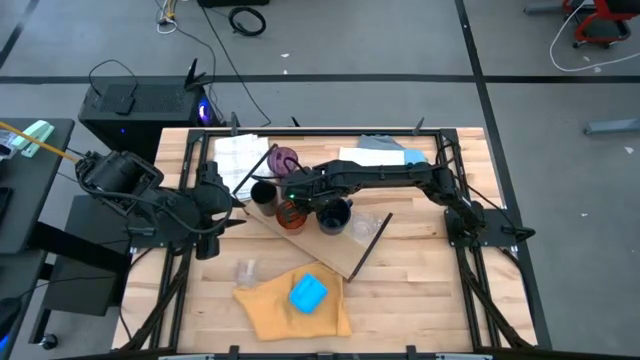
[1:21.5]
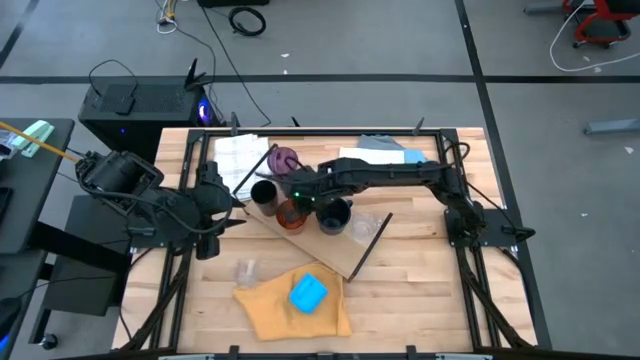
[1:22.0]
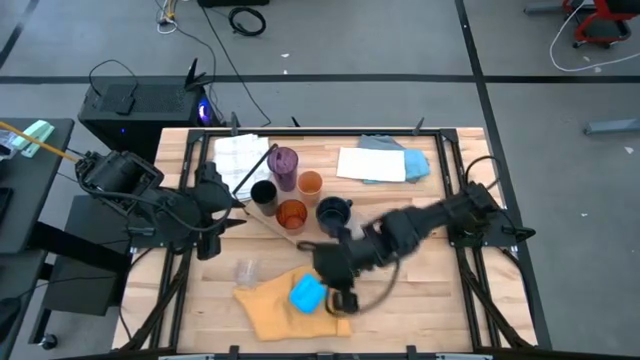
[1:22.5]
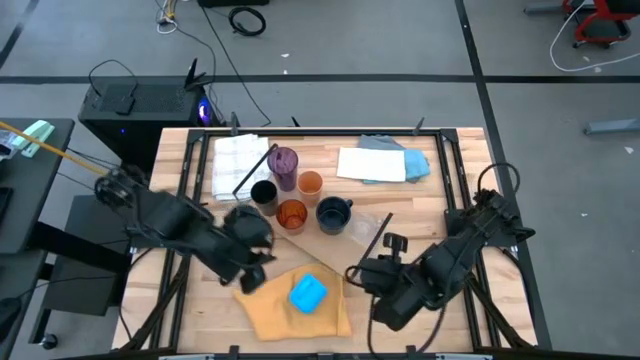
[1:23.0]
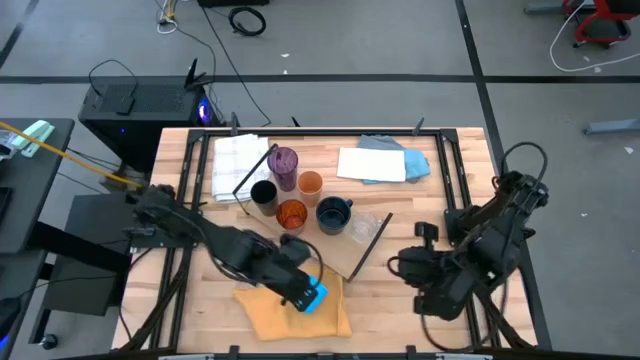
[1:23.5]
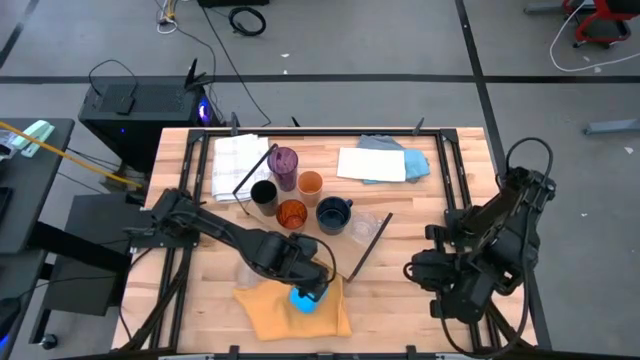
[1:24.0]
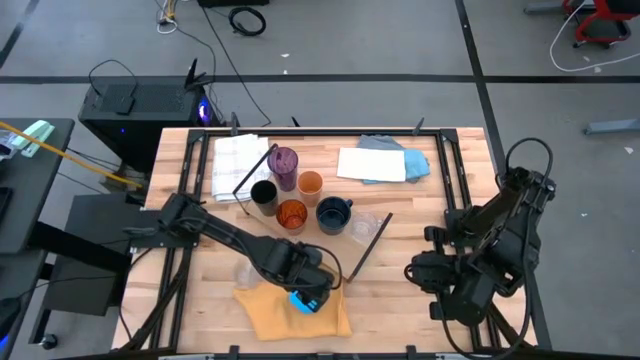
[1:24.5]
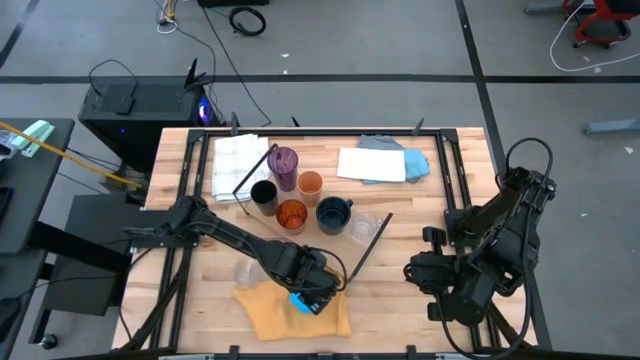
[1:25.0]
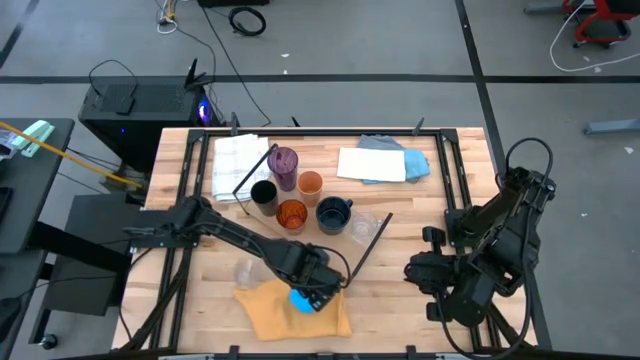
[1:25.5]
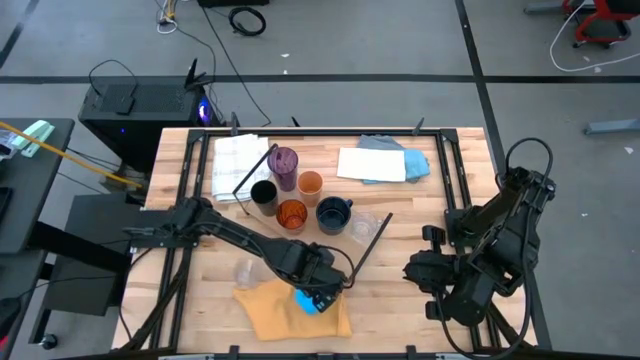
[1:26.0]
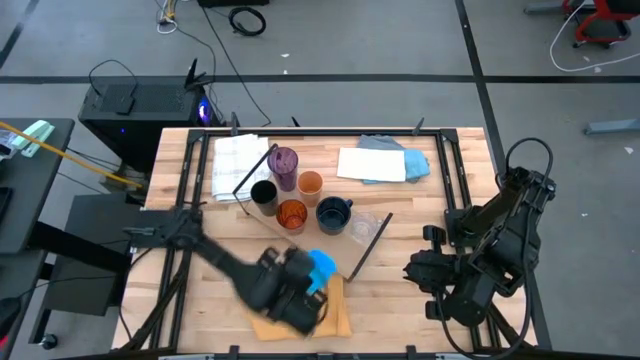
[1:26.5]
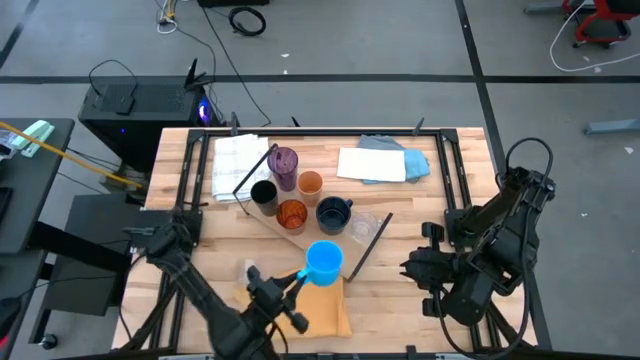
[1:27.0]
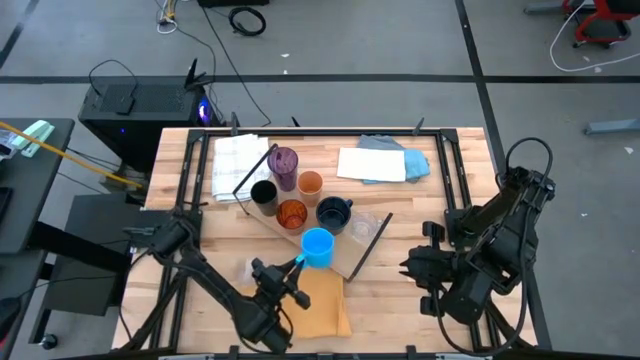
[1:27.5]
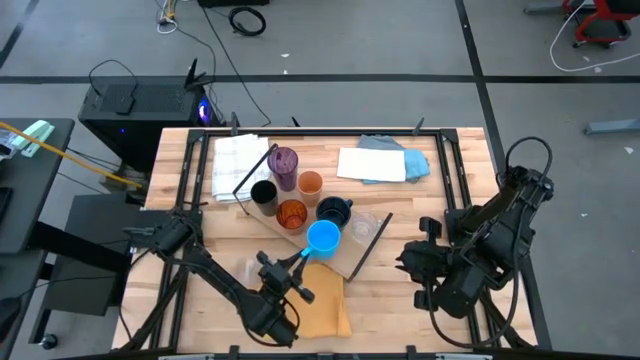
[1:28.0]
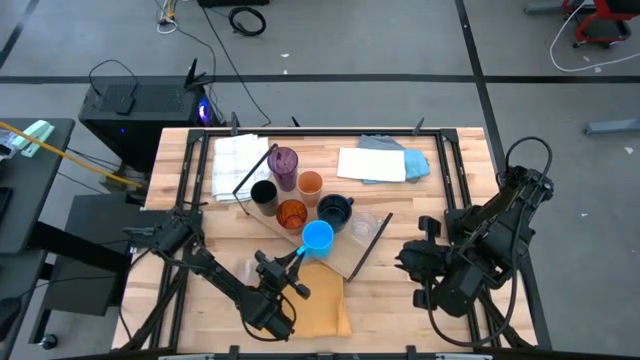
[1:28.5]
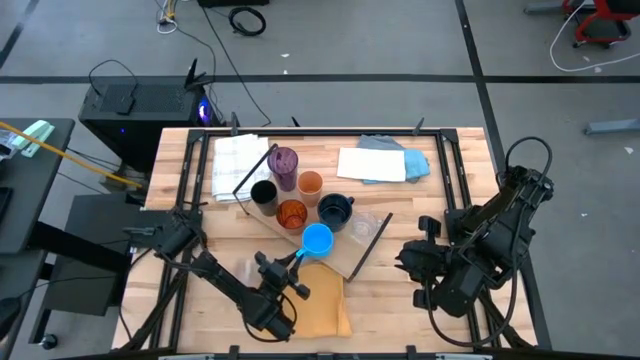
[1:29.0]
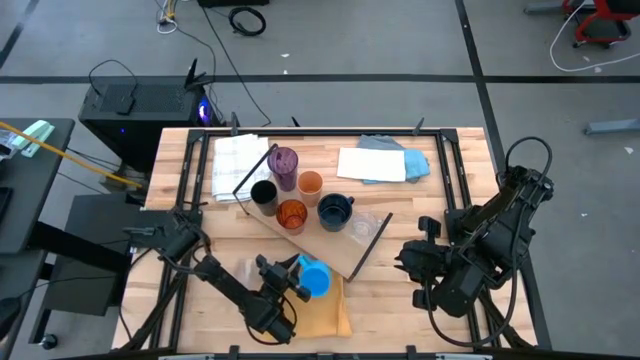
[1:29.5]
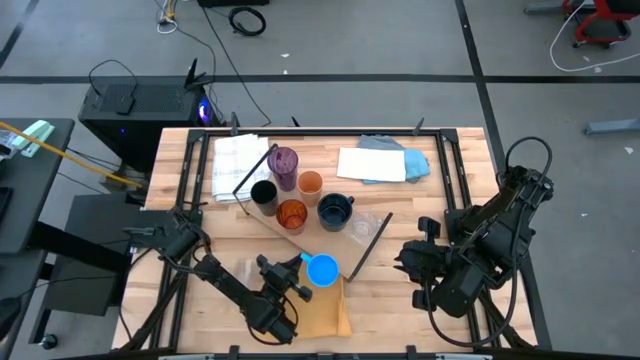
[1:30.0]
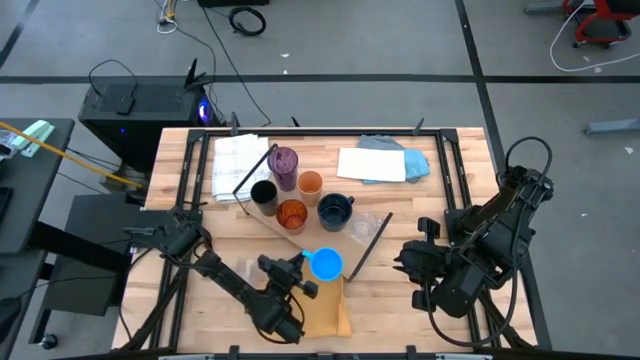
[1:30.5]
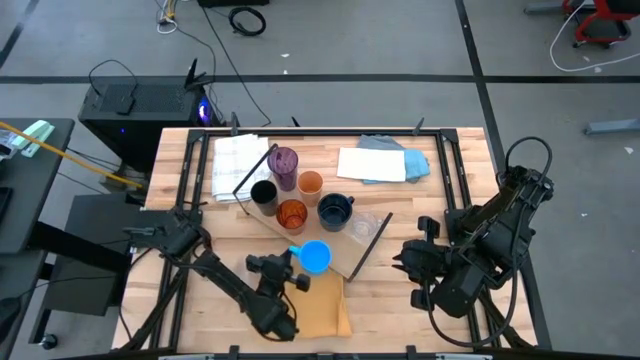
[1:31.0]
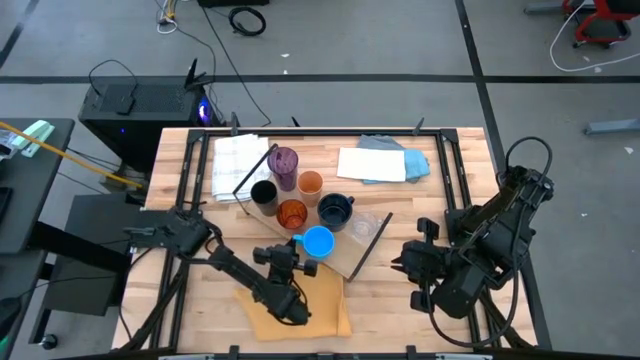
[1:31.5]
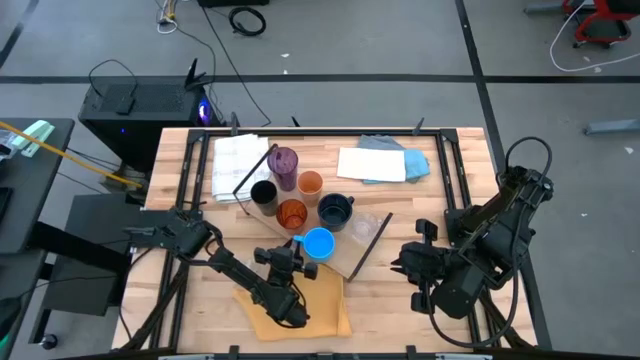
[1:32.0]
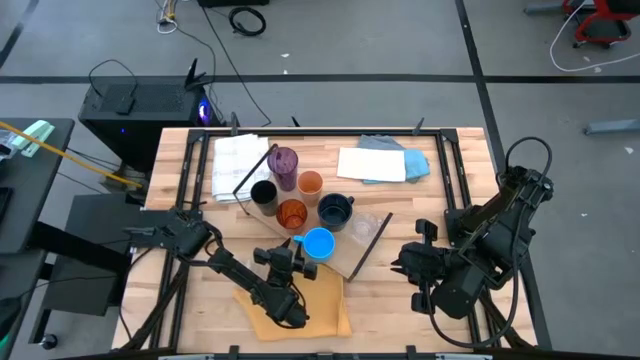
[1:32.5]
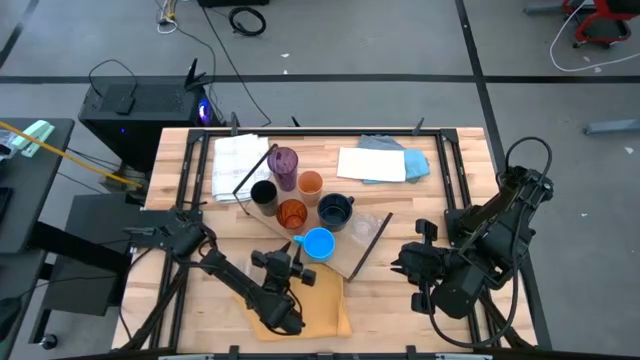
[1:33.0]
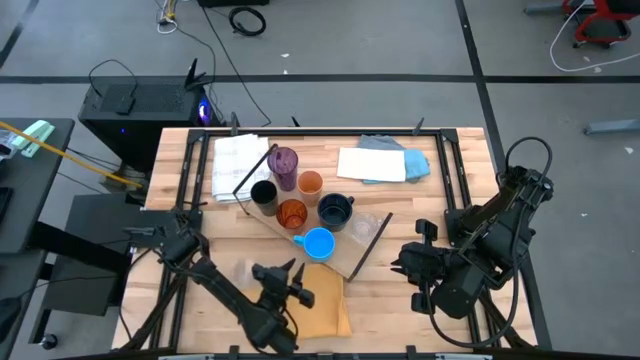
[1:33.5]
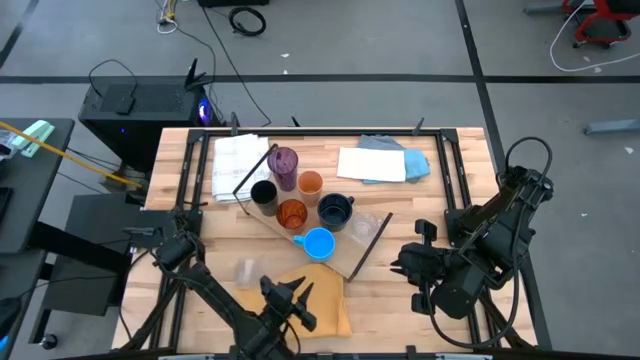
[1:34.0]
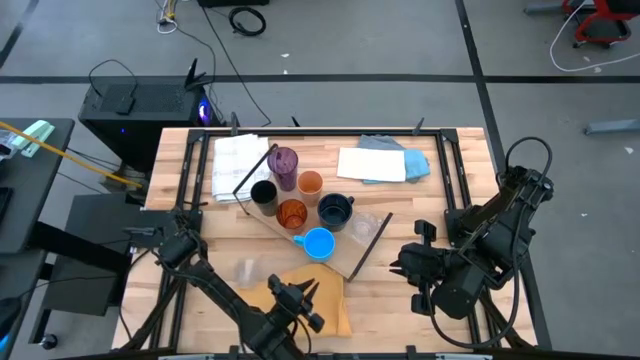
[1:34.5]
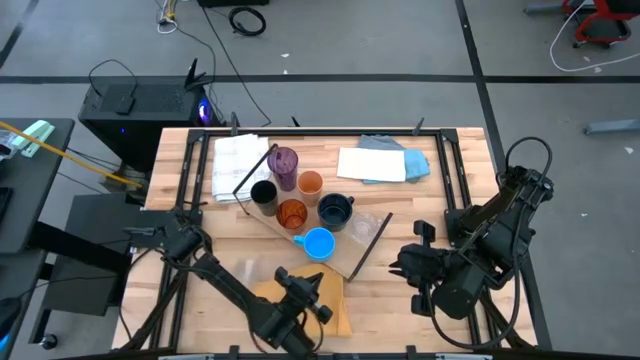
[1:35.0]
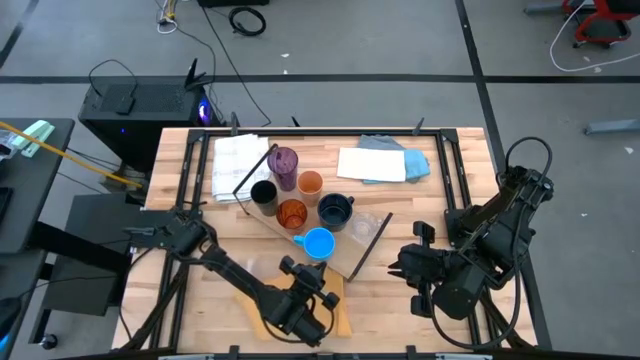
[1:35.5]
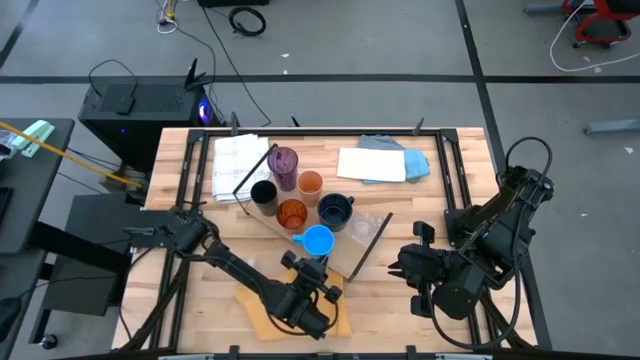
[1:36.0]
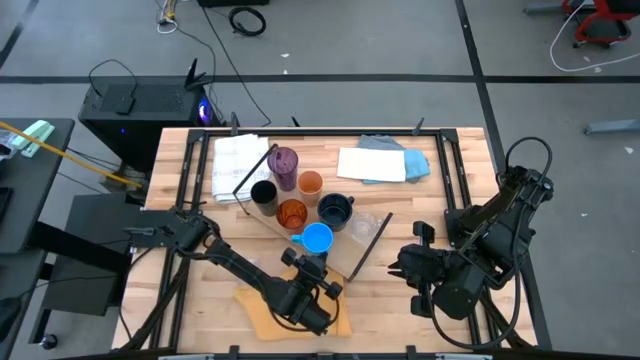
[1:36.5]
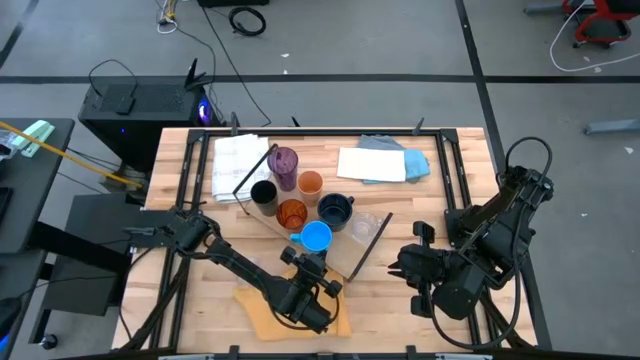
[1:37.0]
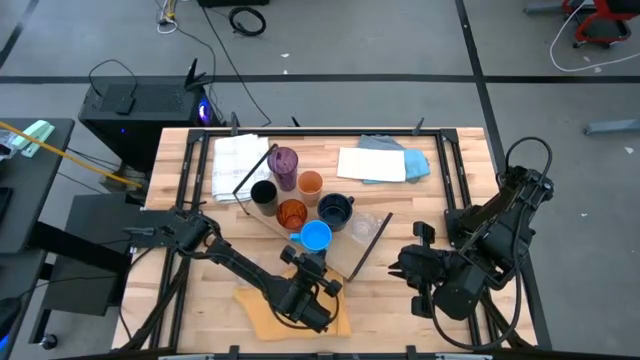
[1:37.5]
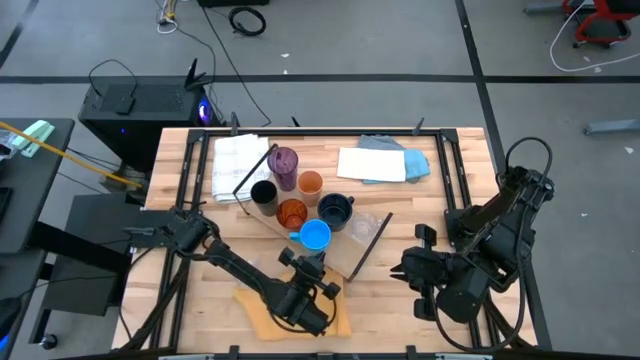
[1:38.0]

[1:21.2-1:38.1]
Task: Stack small to large cups/mugs on shelf
Put the blue mug on the shelf

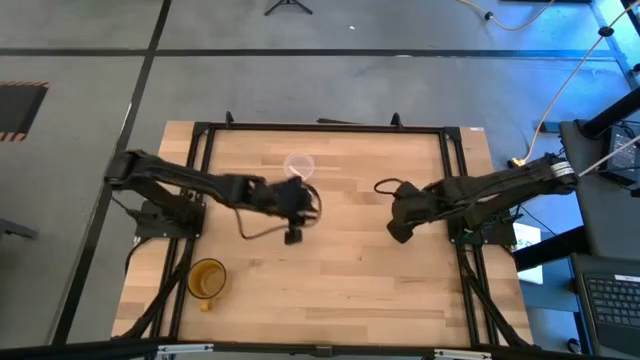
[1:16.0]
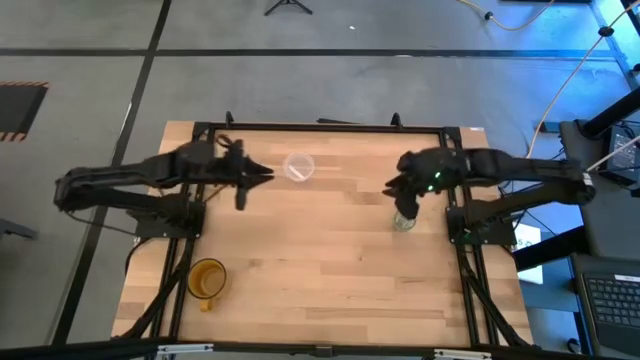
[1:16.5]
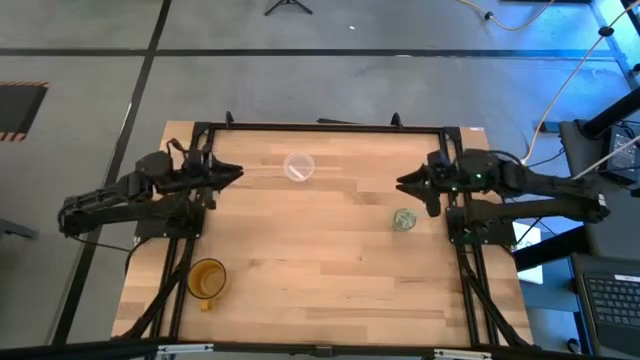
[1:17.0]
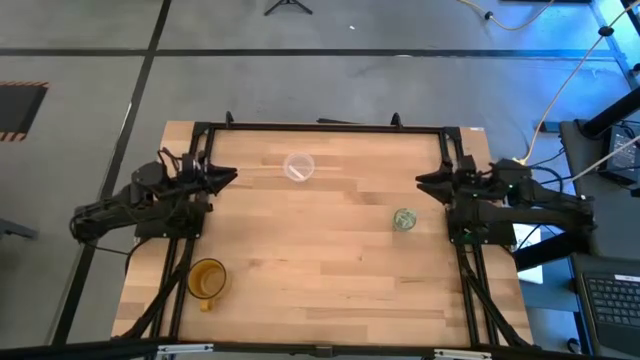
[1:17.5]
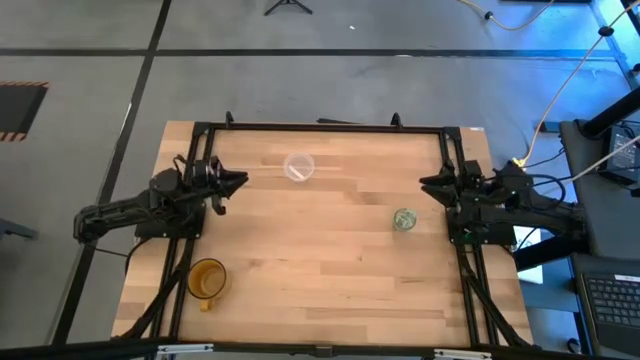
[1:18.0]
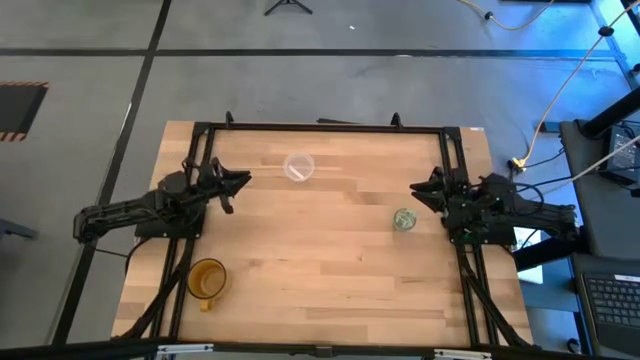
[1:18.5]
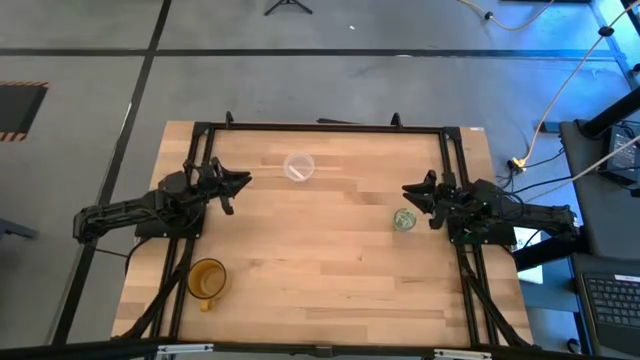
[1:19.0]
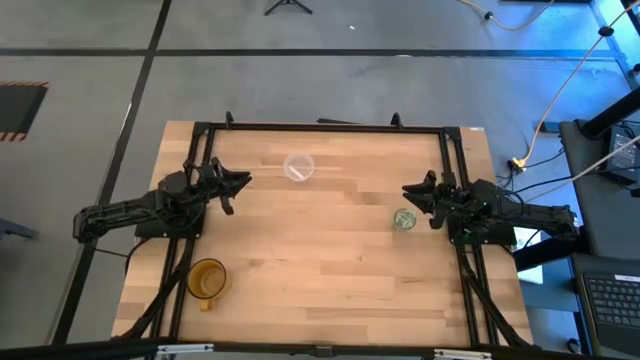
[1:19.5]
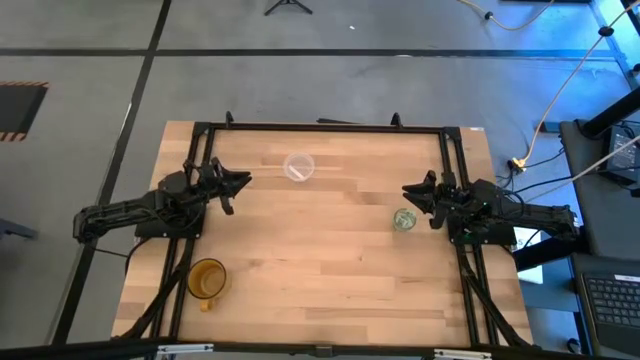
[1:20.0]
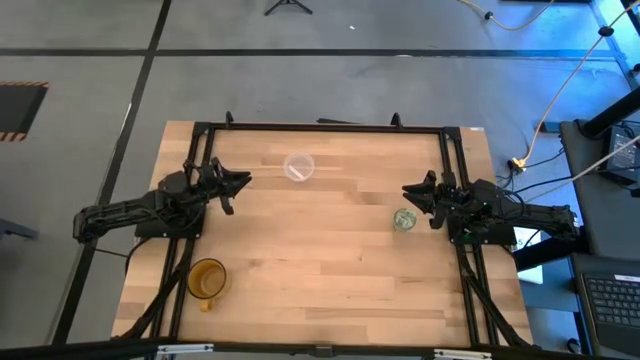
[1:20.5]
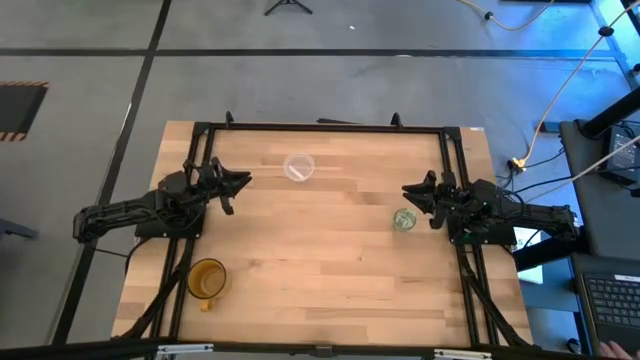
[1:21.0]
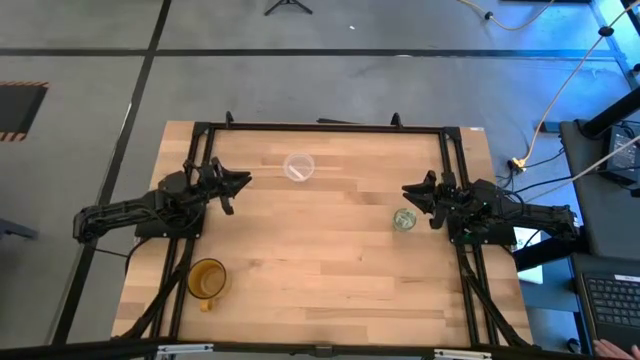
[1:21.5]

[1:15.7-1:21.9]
Task: Pick and place Stevia / Truvia into bins
Return to Home Position
